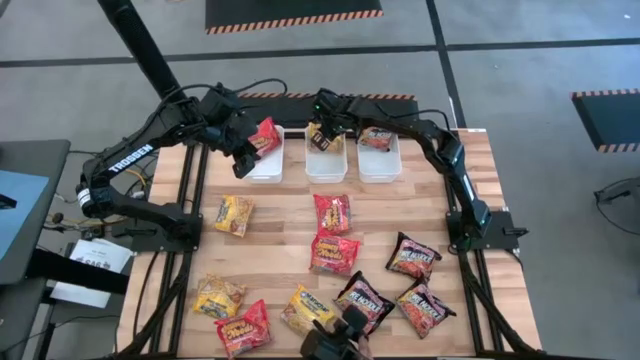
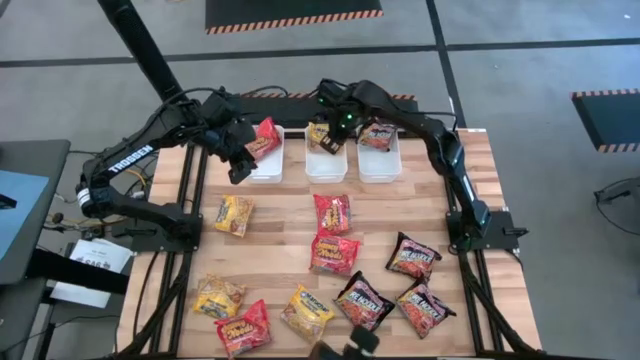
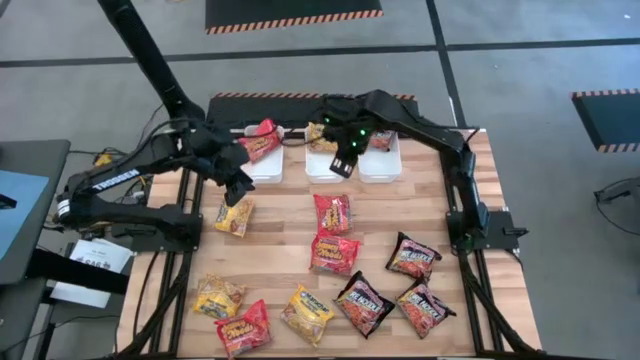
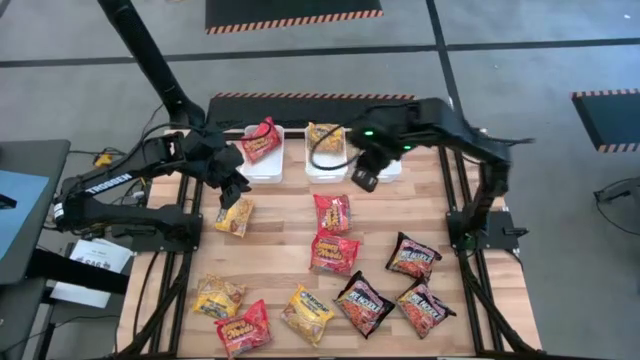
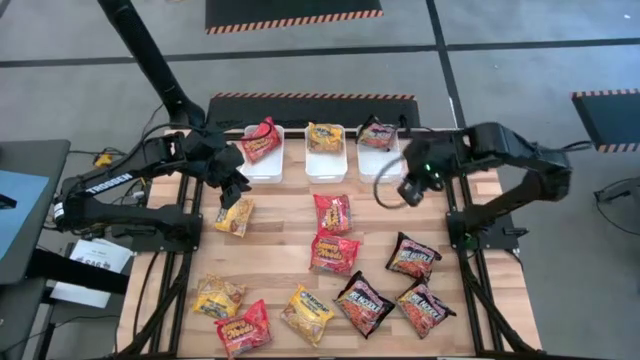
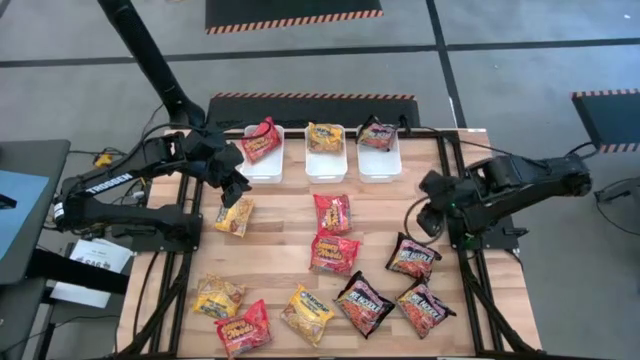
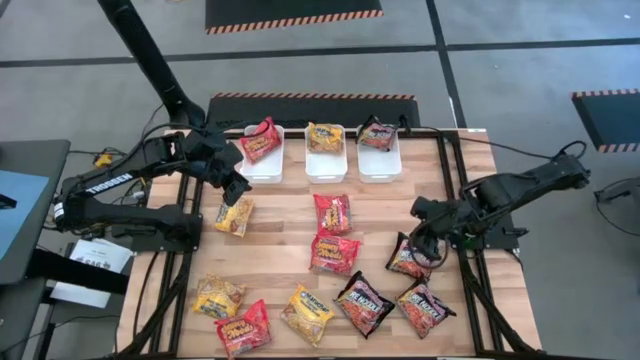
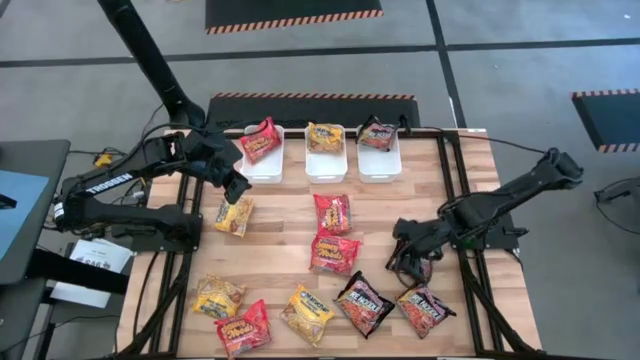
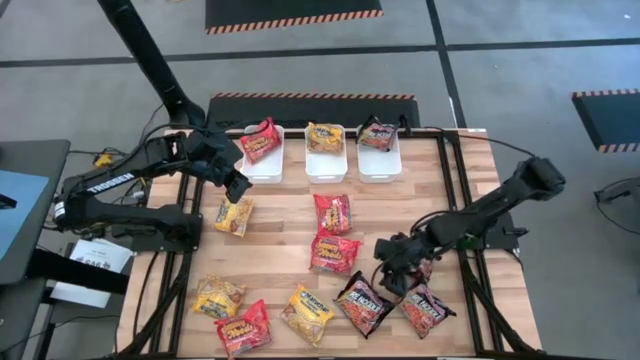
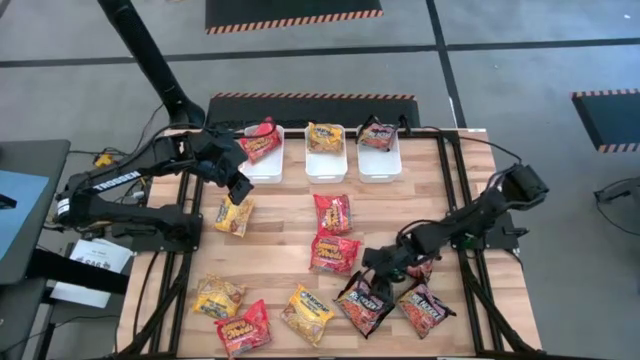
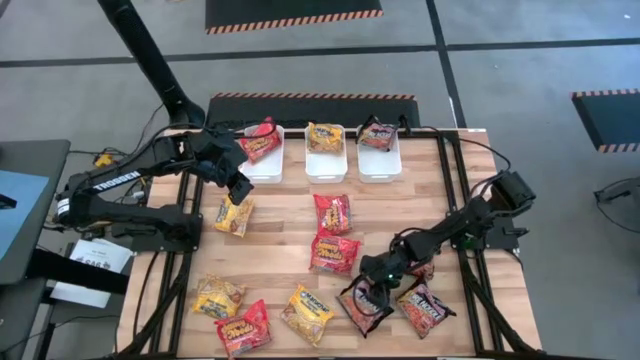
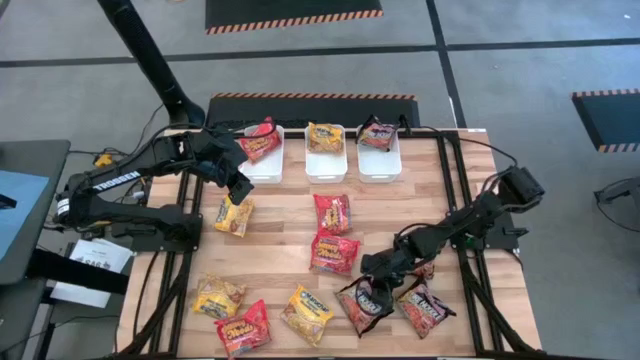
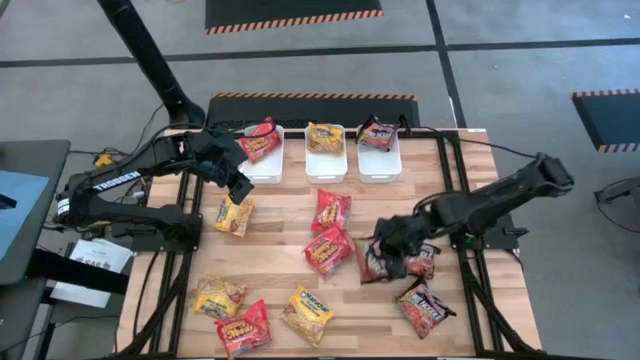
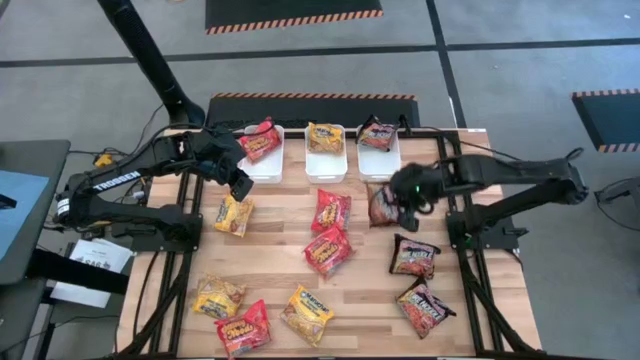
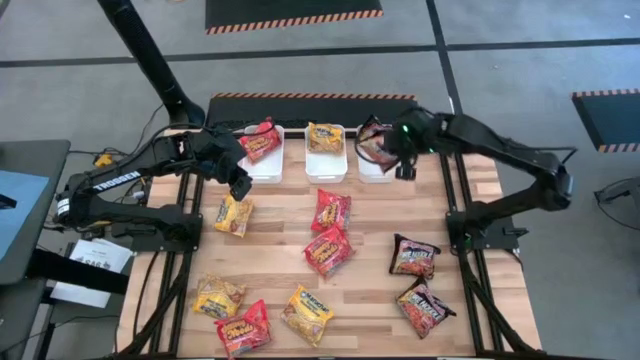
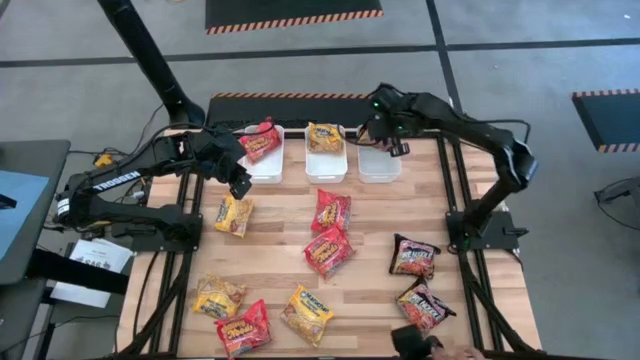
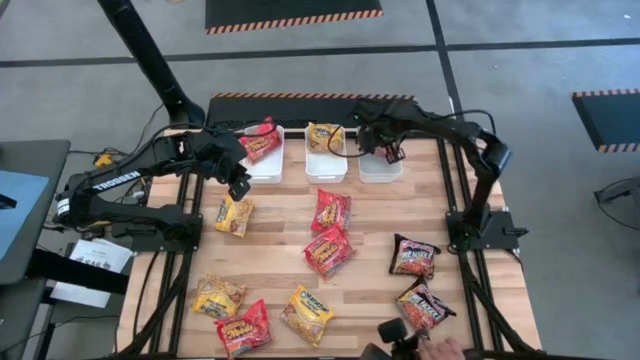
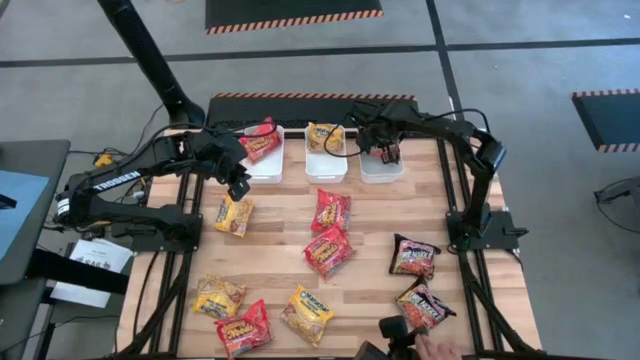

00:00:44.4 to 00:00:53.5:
Task: Sort Maruchan noodles
Put the black noodle pack into the right white bin

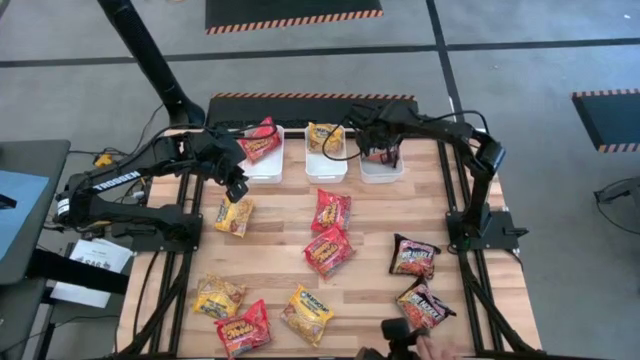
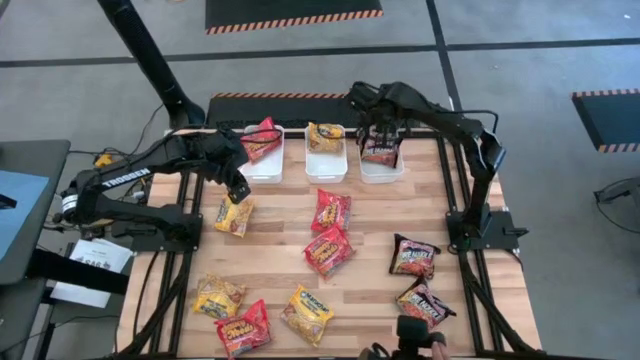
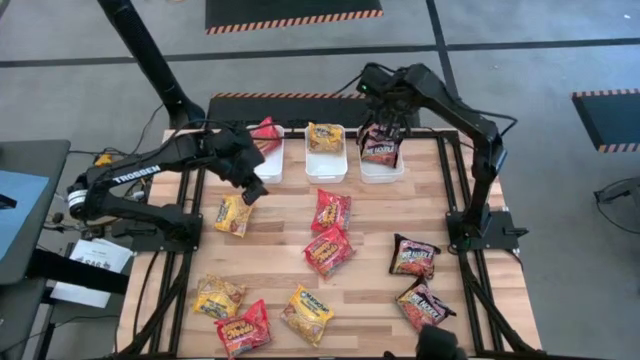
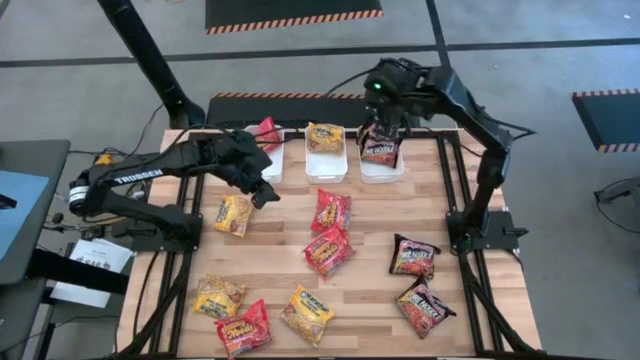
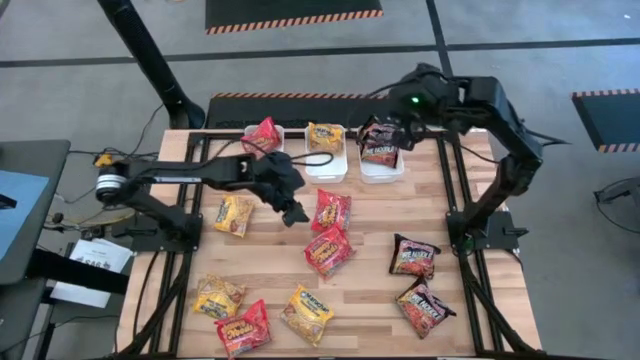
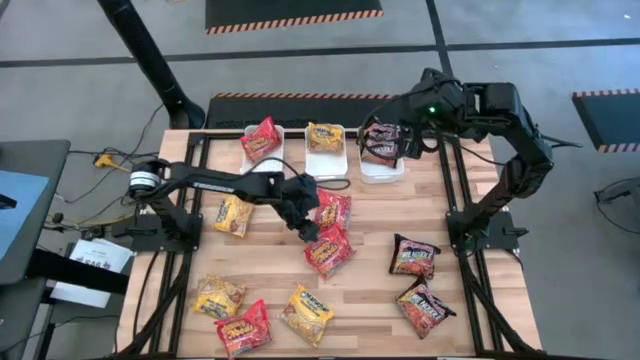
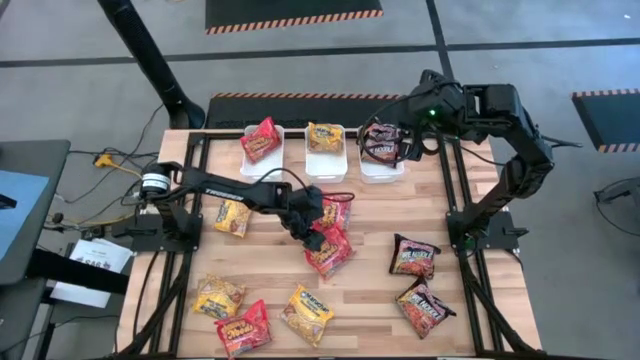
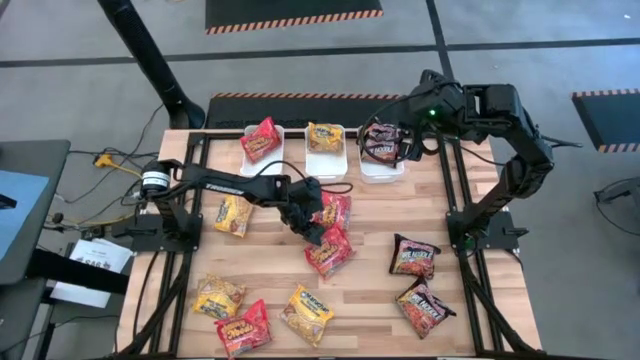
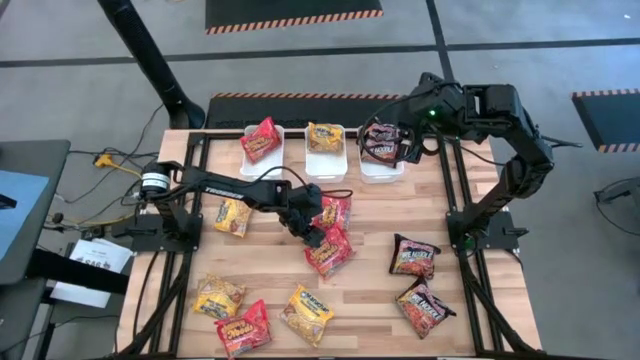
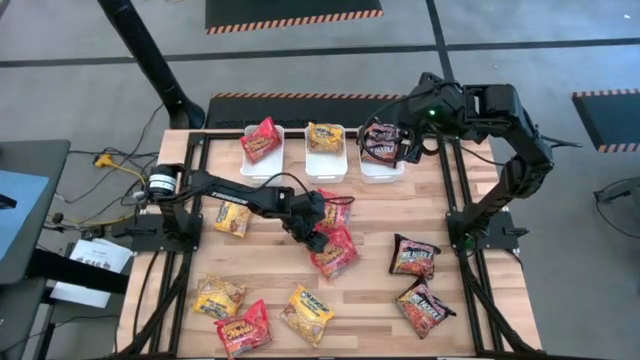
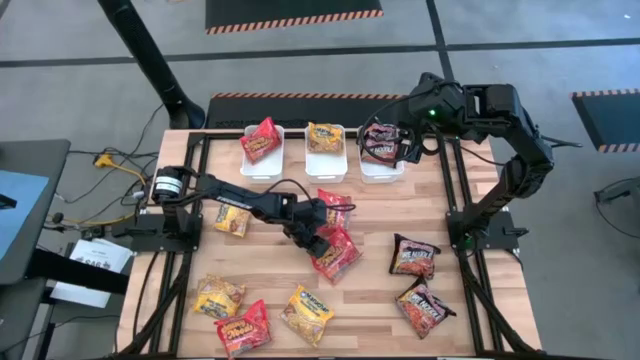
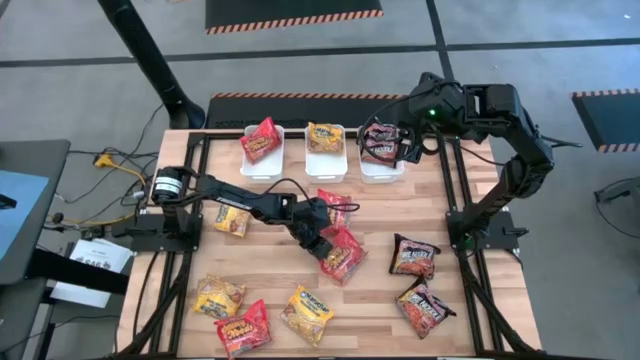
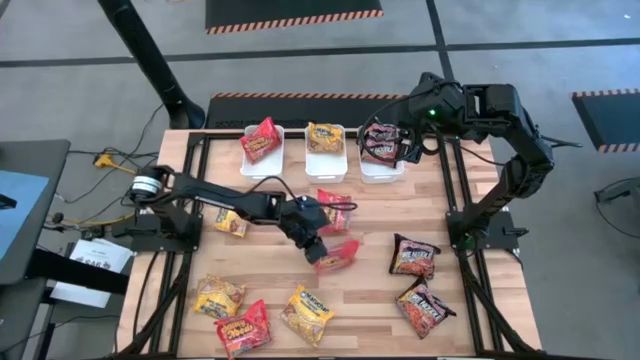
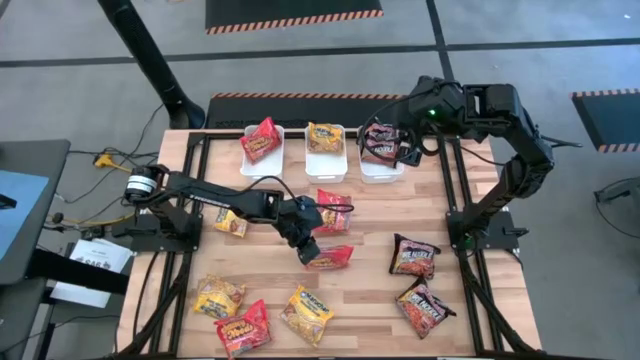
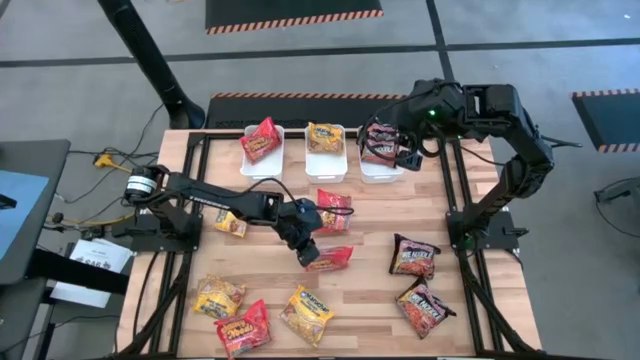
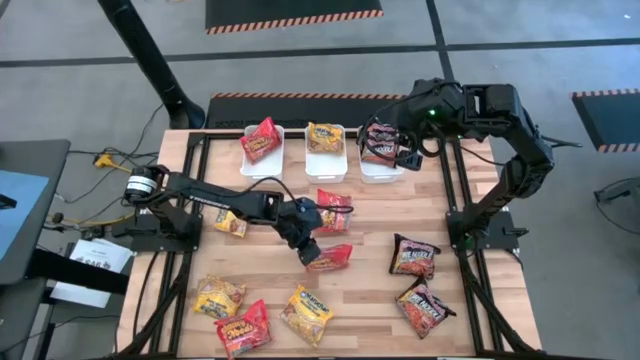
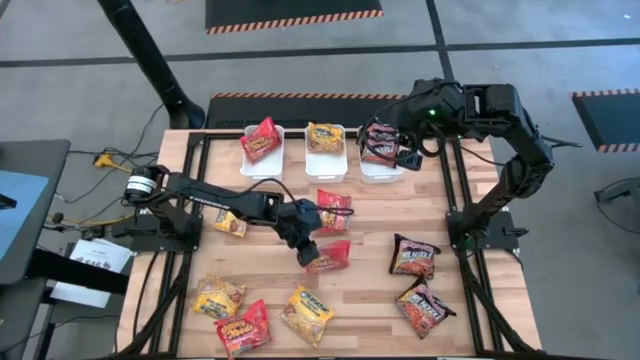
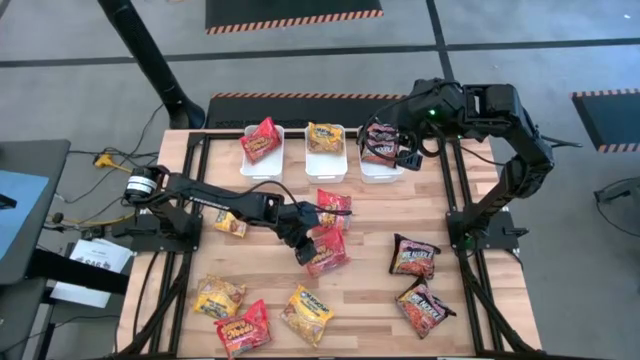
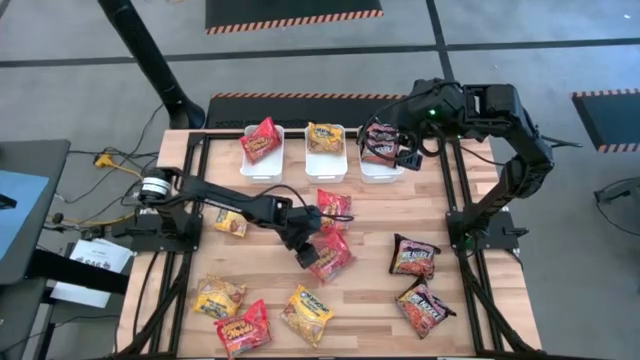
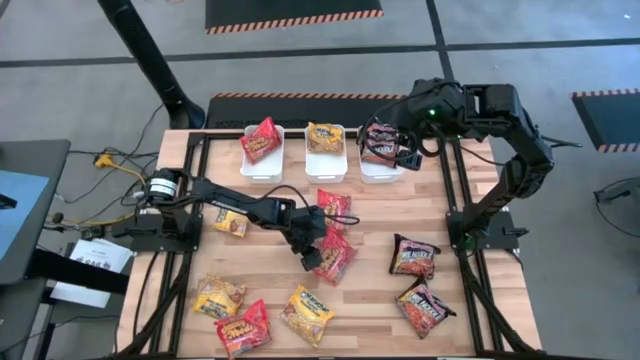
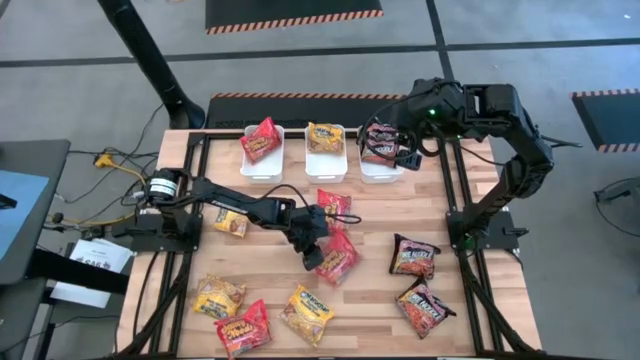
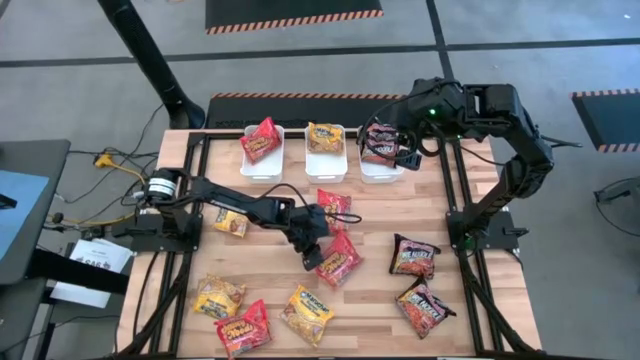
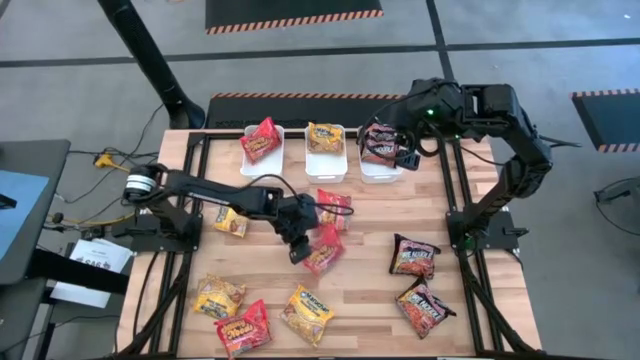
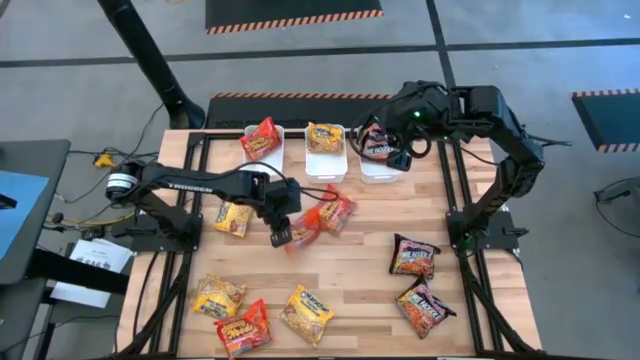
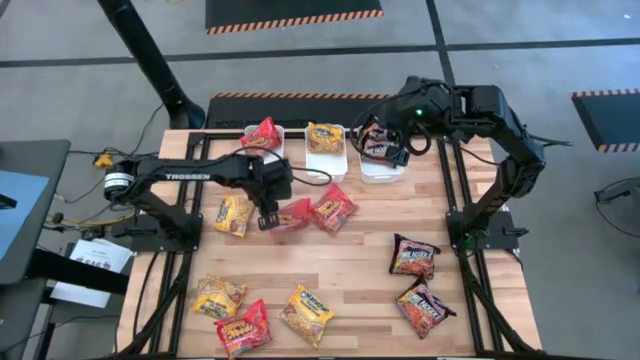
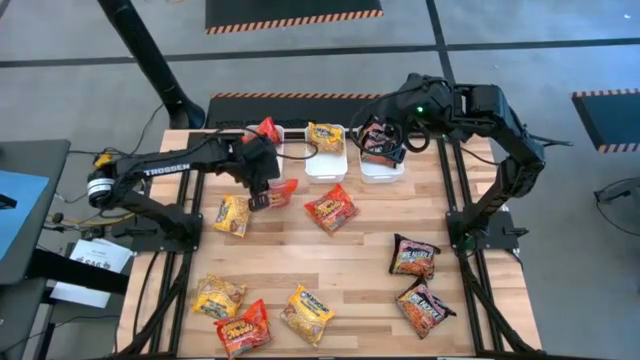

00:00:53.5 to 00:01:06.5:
Put the orange noodle pack into the left white bin
